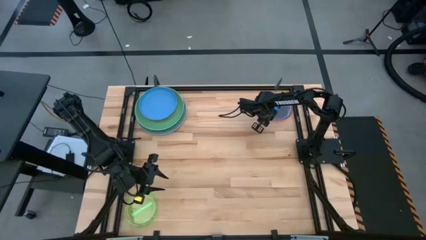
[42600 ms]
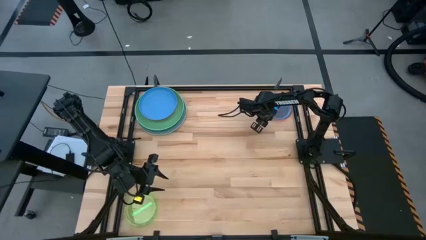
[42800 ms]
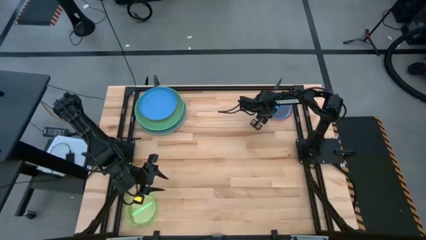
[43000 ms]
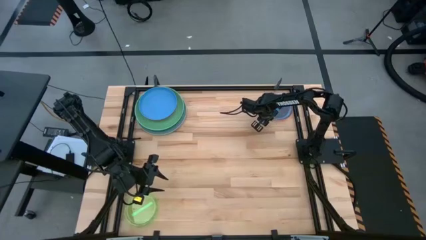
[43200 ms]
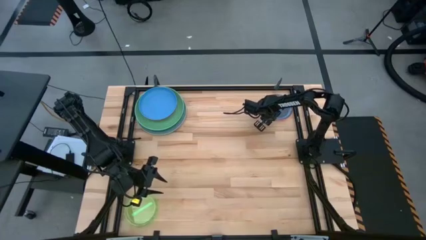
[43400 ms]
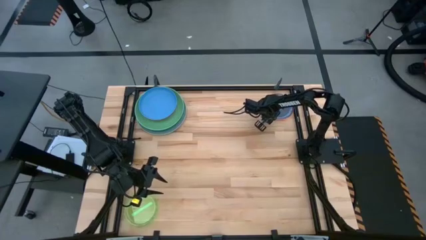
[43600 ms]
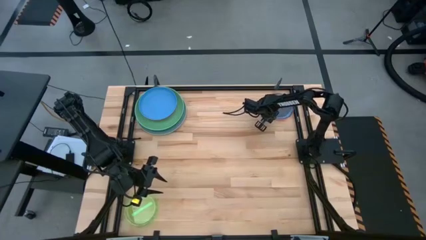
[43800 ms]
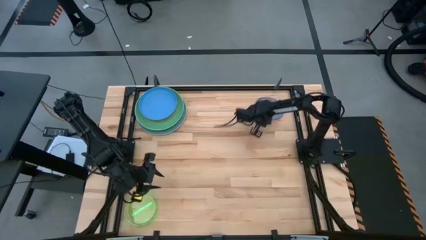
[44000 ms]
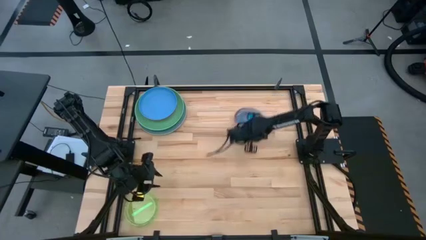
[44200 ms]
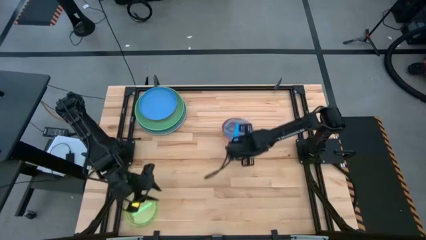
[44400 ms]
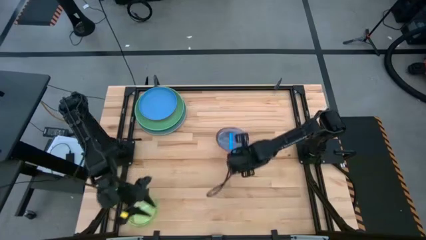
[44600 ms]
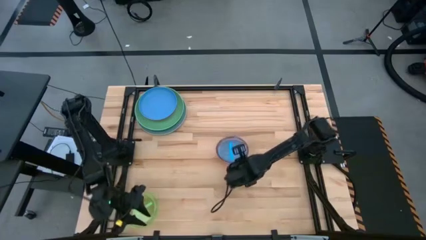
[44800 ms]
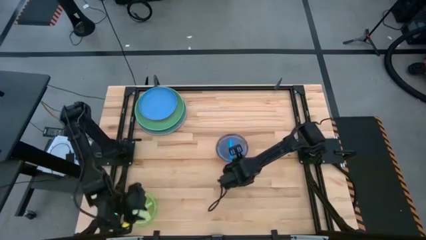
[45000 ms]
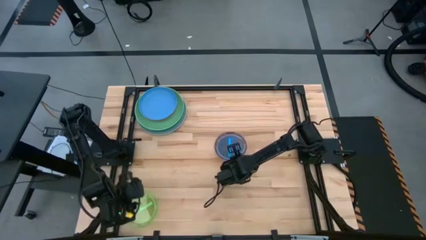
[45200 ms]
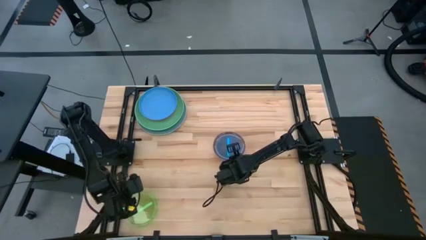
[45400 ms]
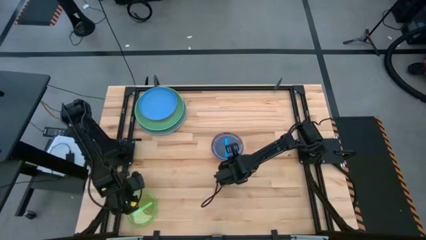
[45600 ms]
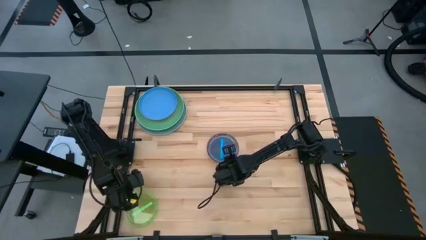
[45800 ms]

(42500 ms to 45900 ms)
Task: Stack plastic plates
Move the right stacked plates to the center of the table

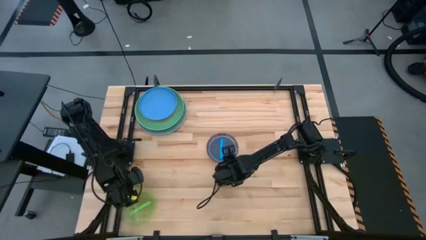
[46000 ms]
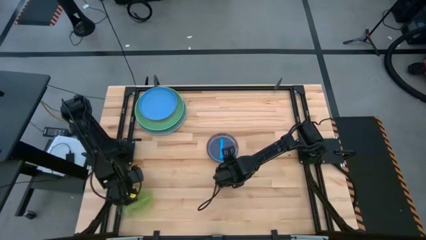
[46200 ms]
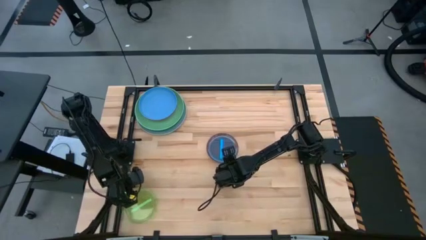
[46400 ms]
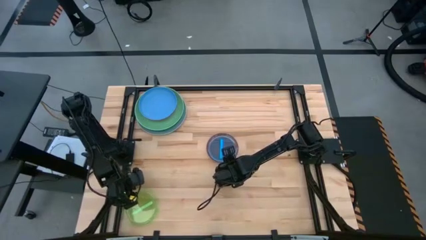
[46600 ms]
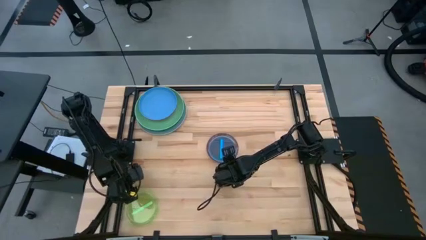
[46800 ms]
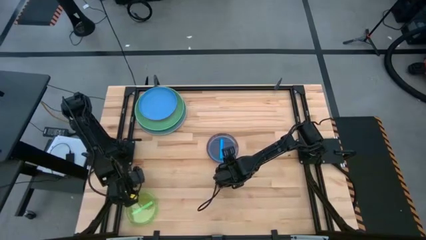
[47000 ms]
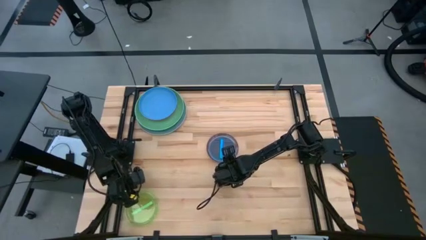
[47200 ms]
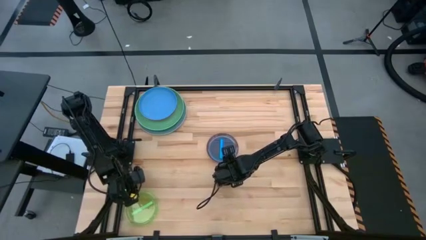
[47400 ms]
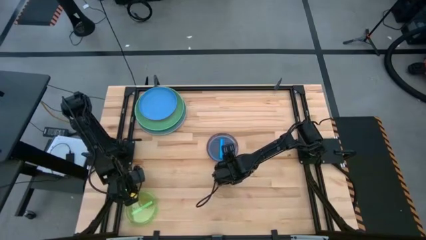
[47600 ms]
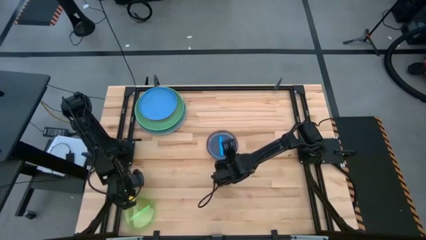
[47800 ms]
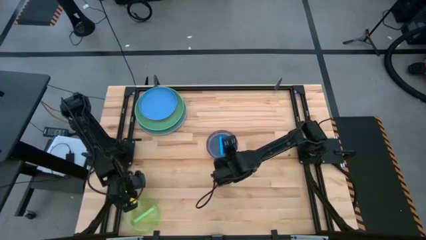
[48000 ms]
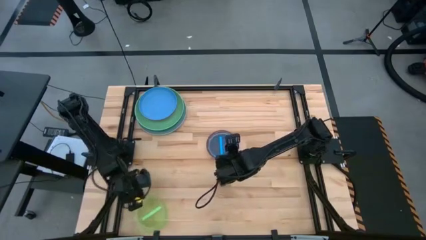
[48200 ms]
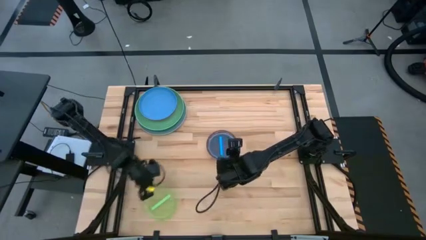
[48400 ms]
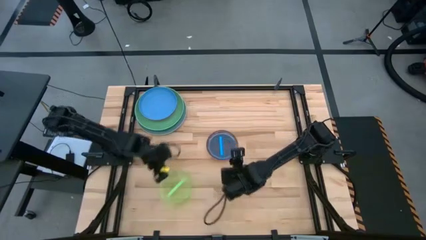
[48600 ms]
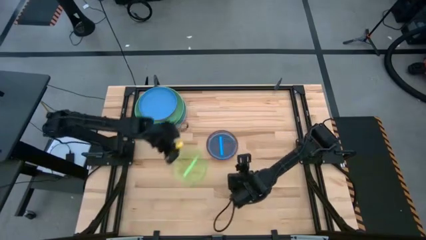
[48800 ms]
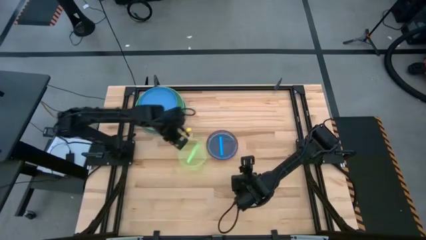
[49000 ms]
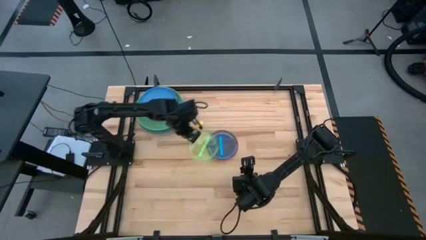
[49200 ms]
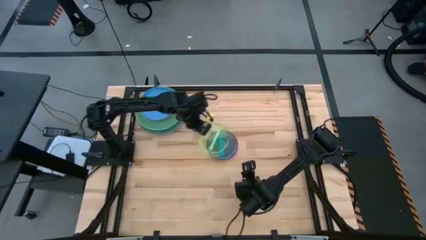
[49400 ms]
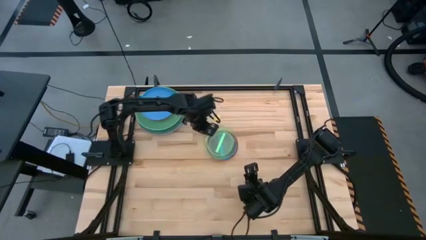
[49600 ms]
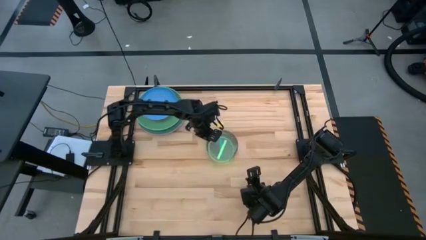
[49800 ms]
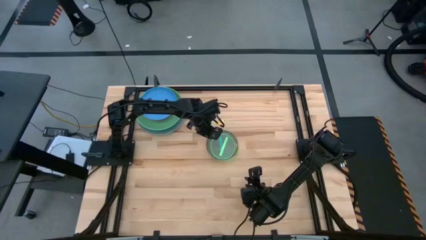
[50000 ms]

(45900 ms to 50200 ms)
Stack the light green plate on top of the light blue plate

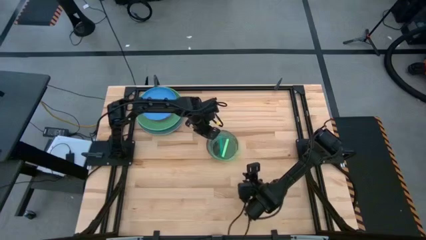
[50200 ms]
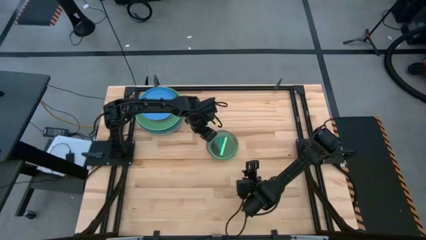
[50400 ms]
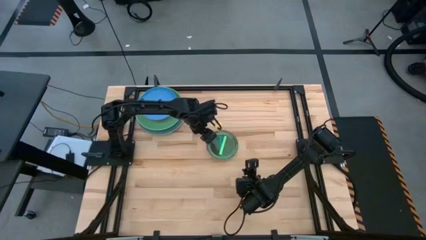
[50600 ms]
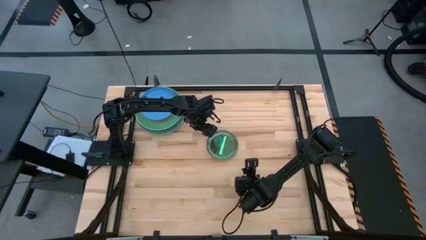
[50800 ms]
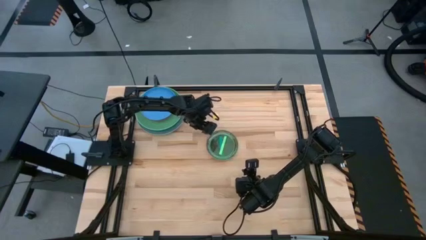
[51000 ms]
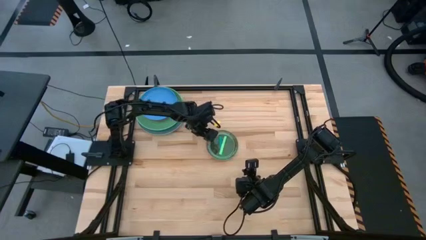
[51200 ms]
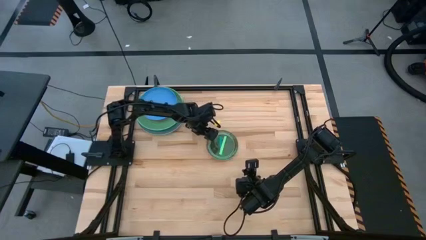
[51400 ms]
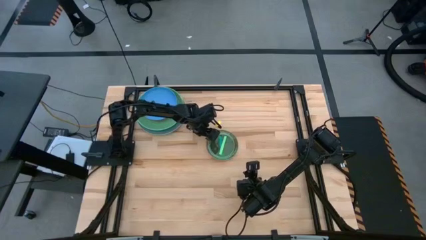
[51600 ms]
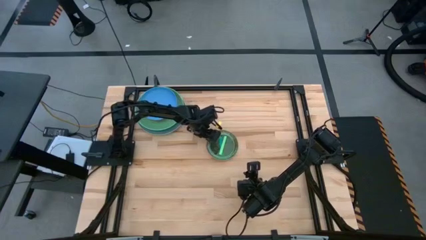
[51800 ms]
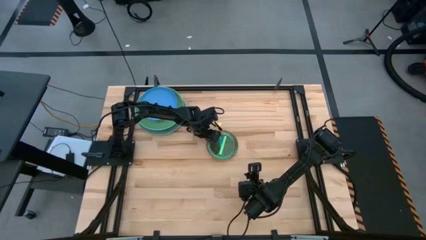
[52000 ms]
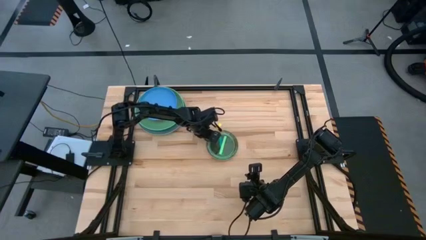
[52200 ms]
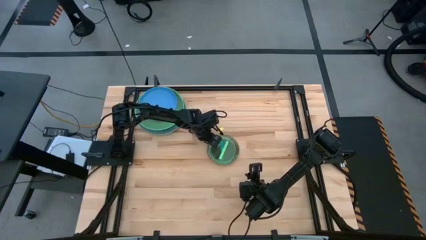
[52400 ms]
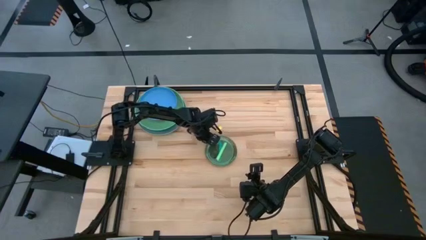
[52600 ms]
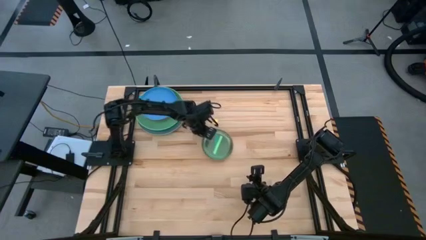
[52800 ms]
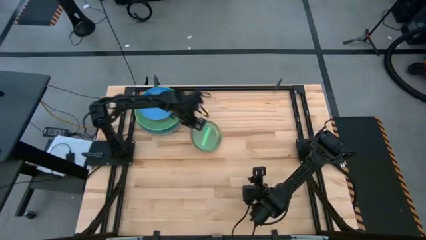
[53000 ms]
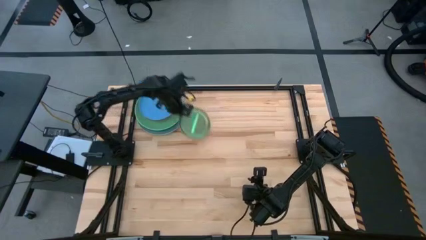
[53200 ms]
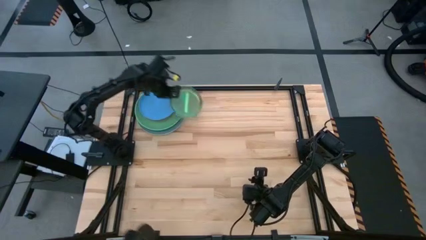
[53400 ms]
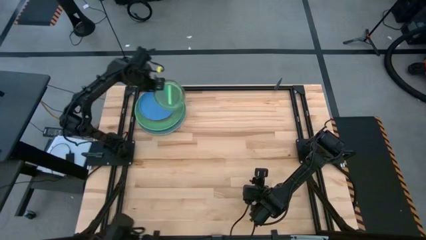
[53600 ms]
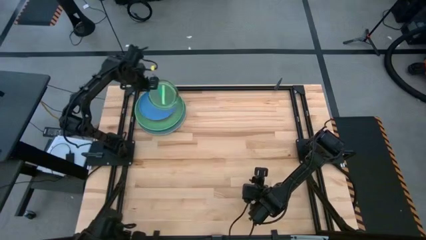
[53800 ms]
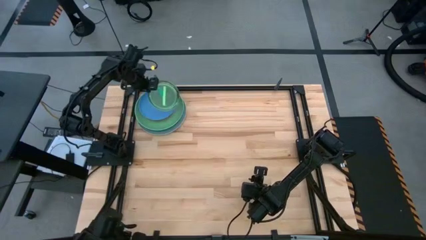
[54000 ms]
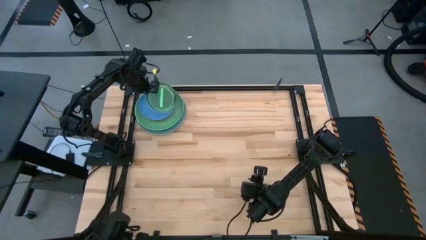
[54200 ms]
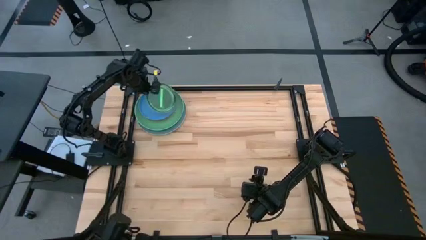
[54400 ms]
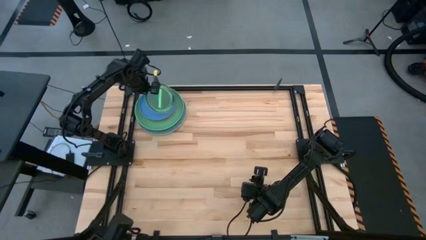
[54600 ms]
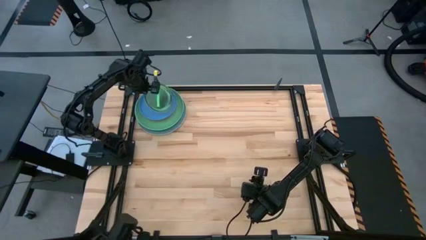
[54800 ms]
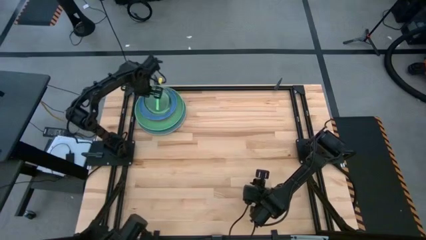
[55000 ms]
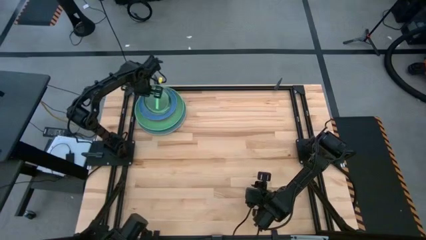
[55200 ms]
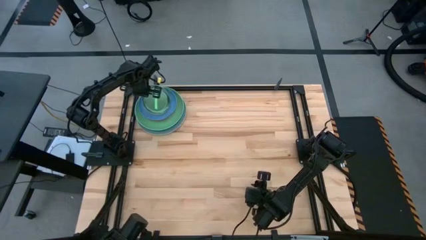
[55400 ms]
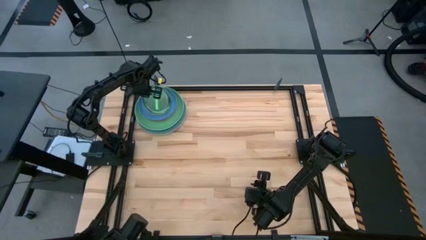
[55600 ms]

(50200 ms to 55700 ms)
Stack the bottom stacked plates on top of the dark blue plate

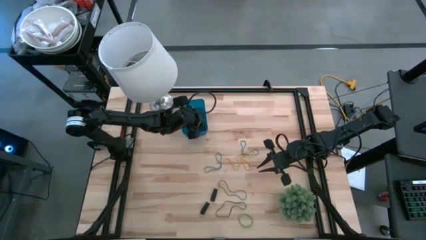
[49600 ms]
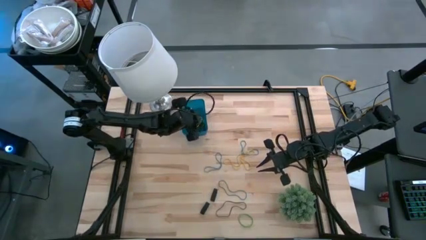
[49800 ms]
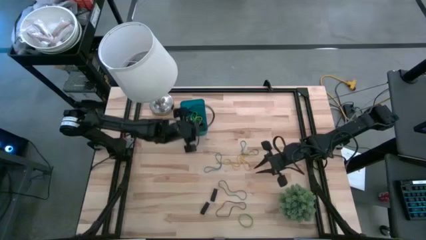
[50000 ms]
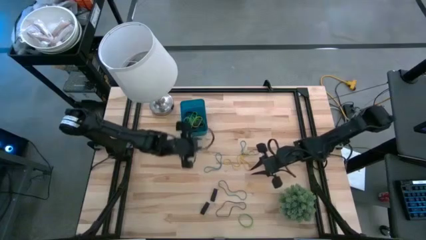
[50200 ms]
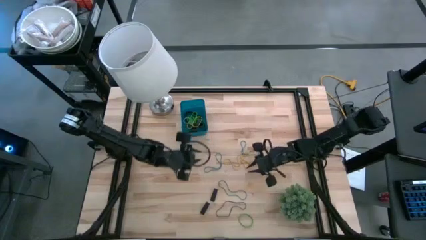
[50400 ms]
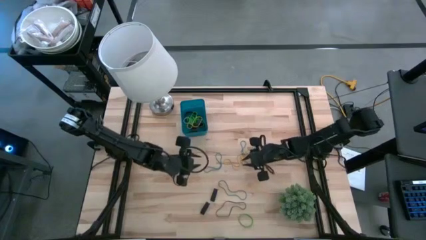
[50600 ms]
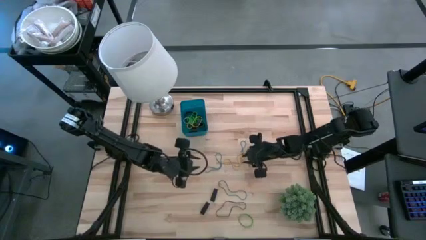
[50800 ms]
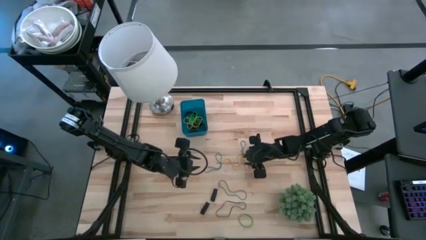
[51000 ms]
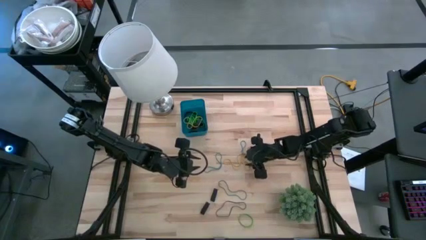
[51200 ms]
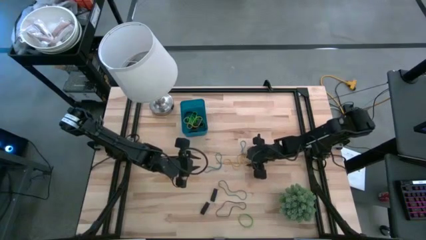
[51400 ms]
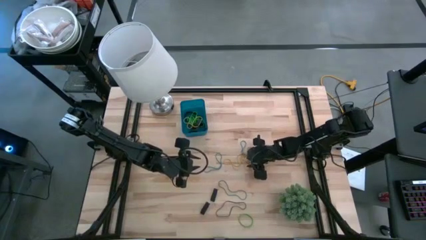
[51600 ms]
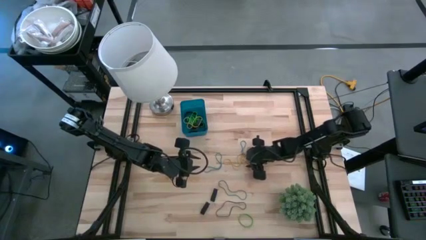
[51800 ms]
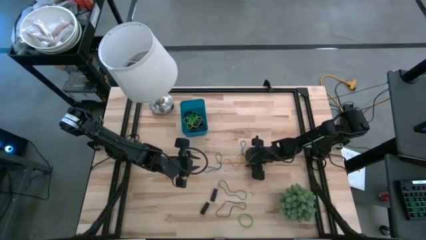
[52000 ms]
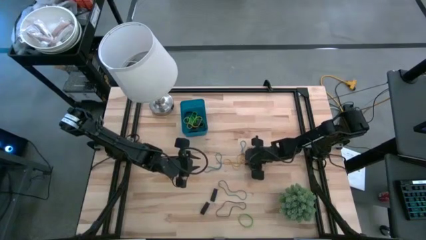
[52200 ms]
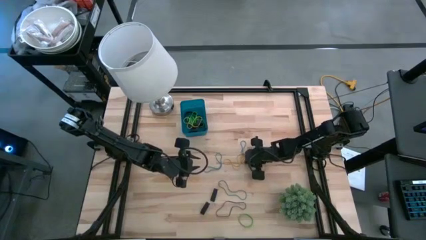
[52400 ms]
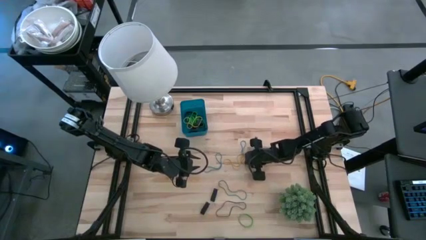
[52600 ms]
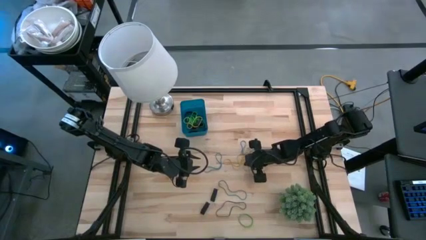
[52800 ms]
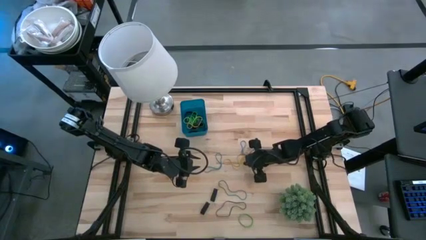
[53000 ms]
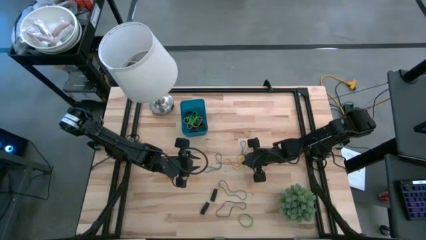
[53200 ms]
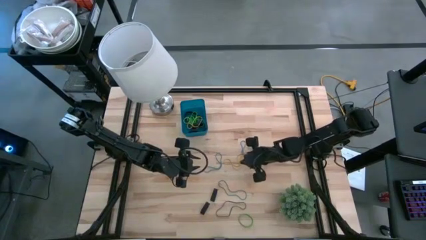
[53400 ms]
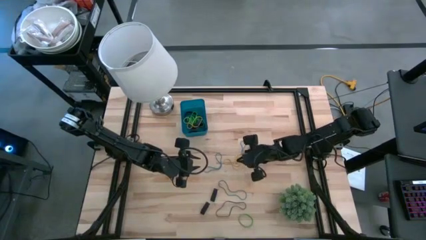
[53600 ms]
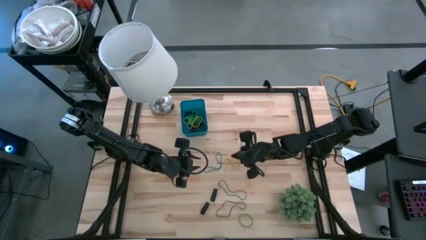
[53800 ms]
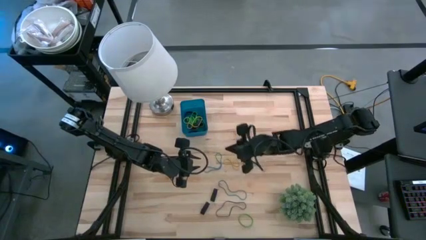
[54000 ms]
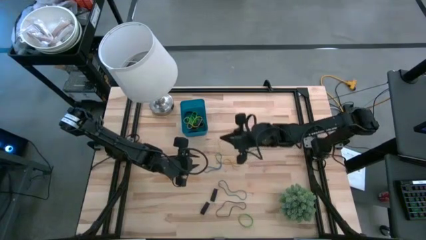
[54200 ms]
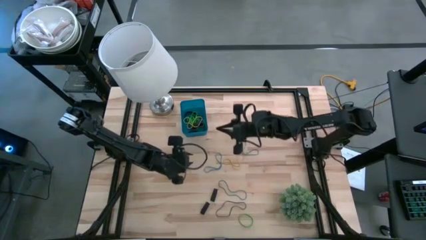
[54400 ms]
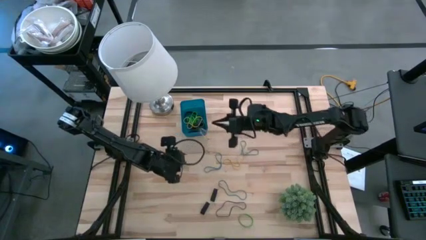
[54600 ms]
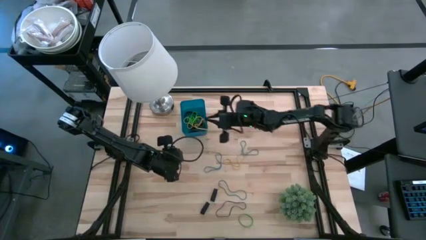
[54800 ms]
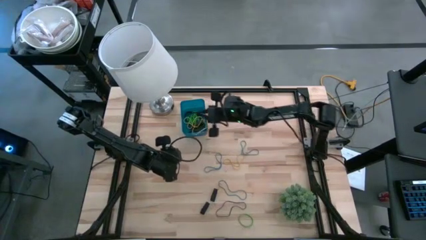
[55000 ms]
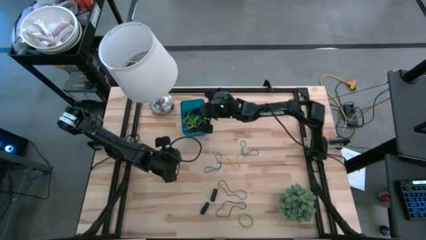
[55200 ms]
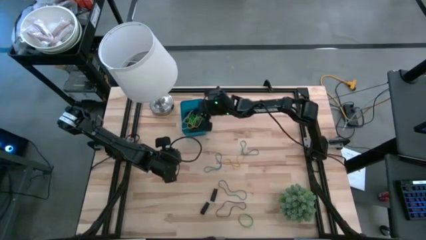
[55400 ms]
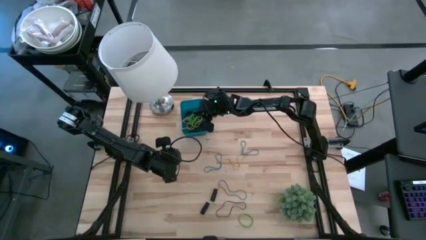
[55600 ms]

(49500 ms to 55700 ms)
Task: Pick and place rubber bands into bin
Put the right yellow rubber band into the blue bin
